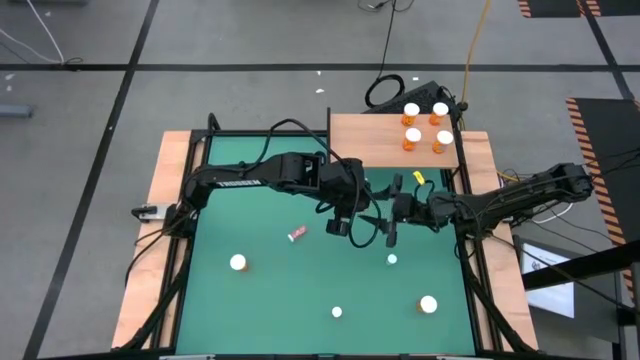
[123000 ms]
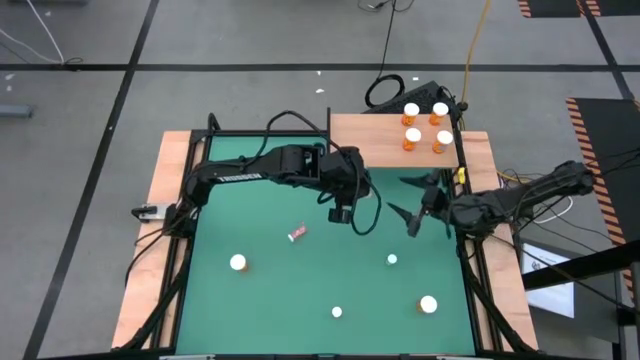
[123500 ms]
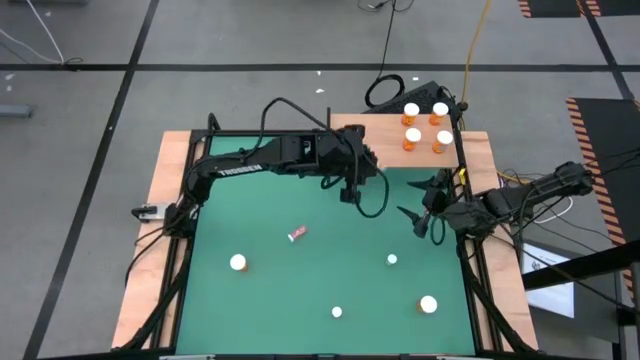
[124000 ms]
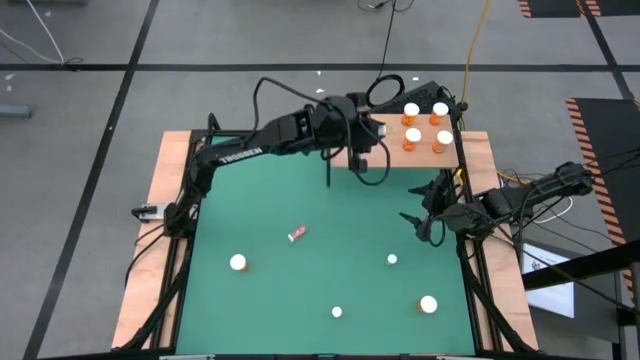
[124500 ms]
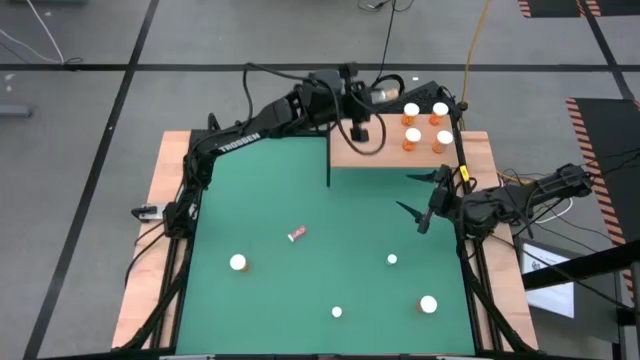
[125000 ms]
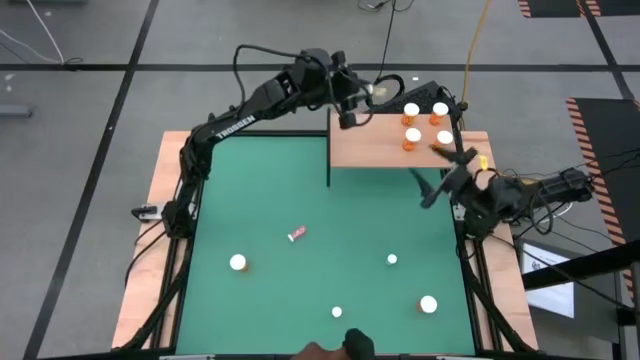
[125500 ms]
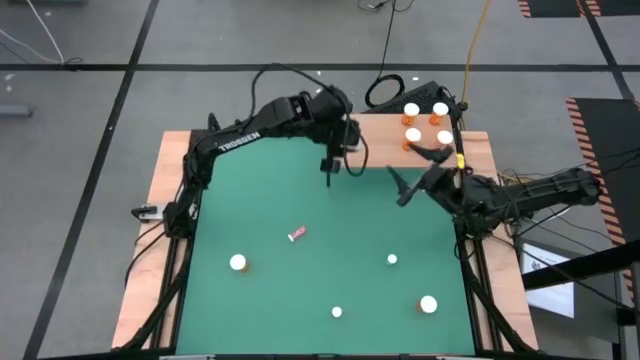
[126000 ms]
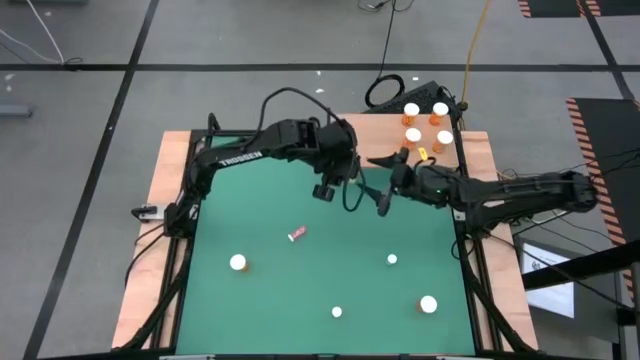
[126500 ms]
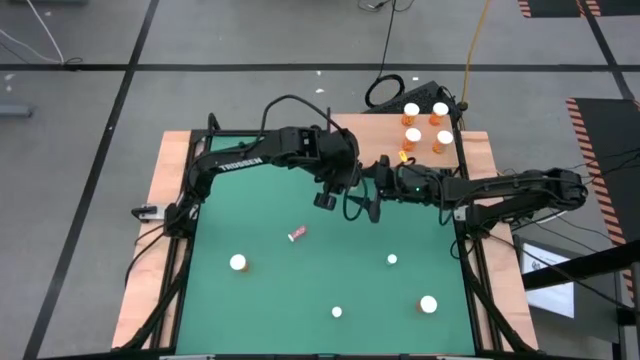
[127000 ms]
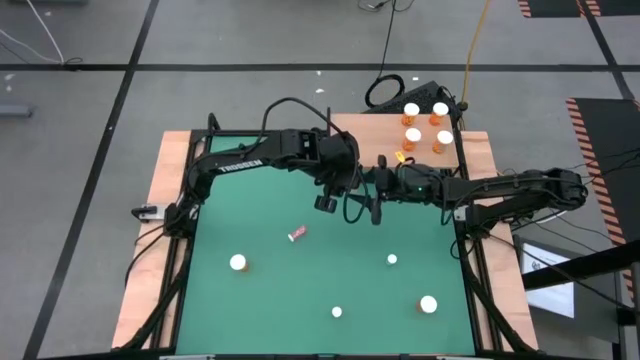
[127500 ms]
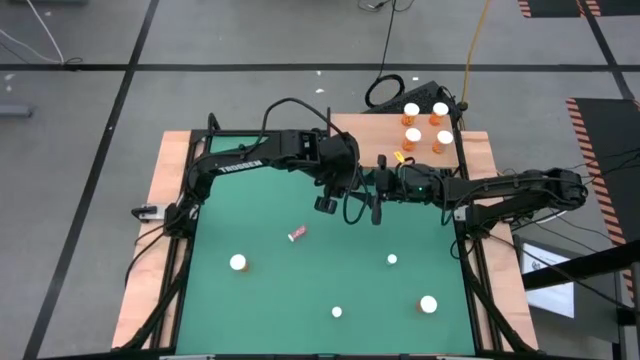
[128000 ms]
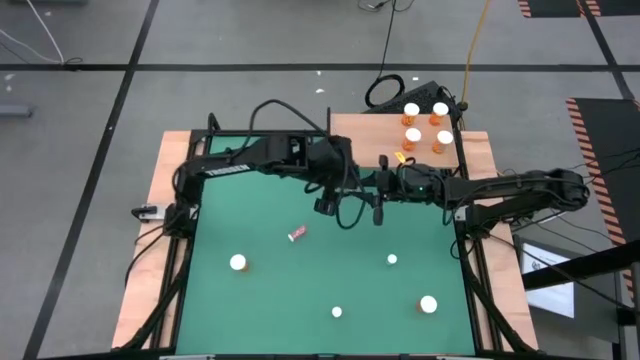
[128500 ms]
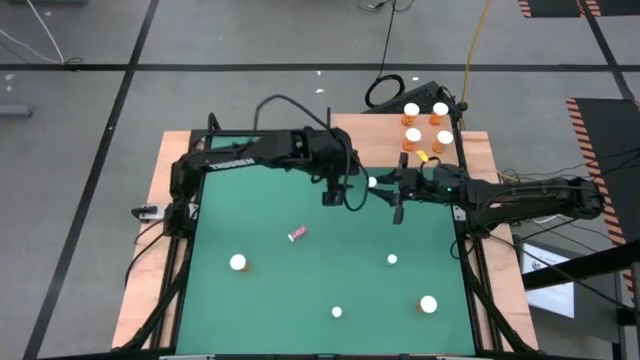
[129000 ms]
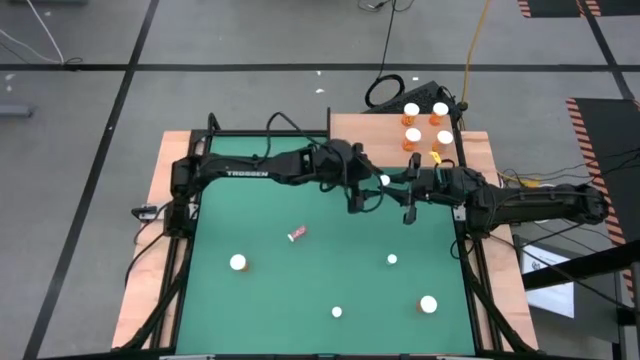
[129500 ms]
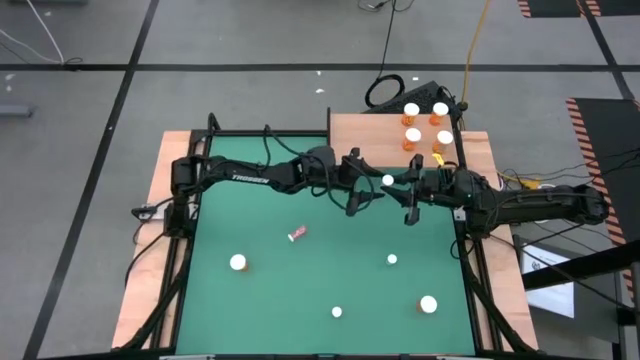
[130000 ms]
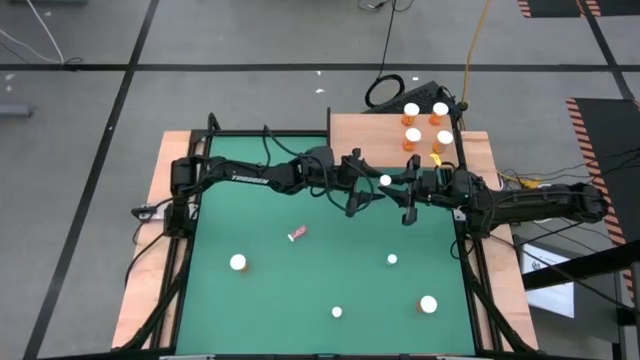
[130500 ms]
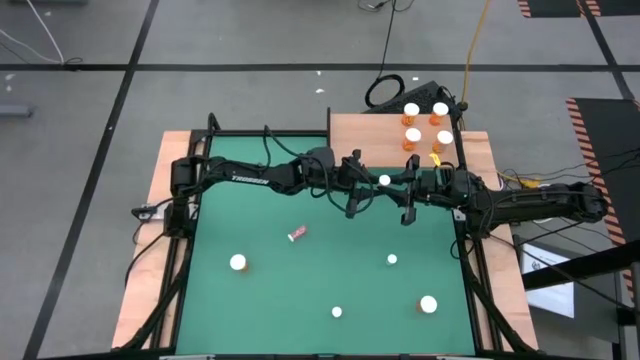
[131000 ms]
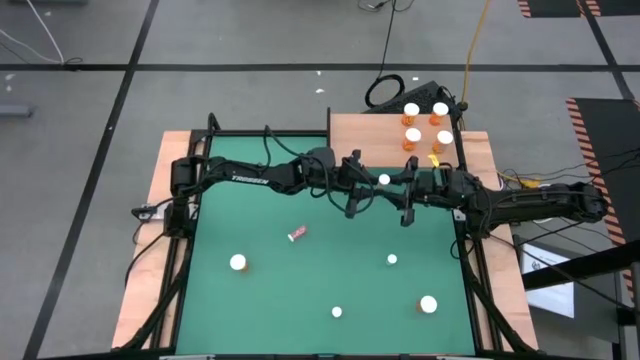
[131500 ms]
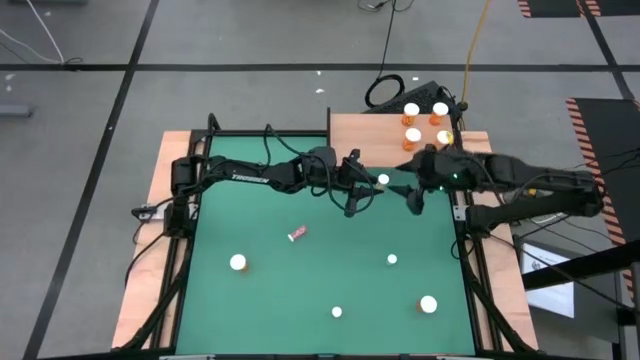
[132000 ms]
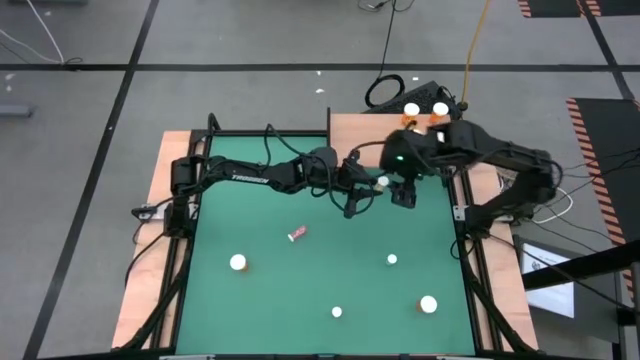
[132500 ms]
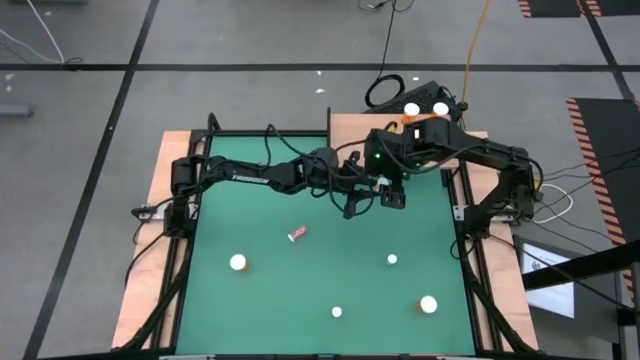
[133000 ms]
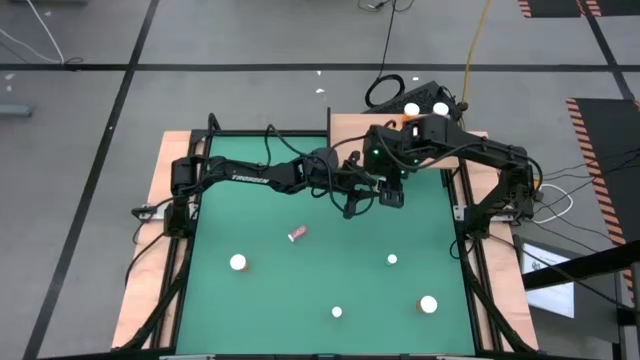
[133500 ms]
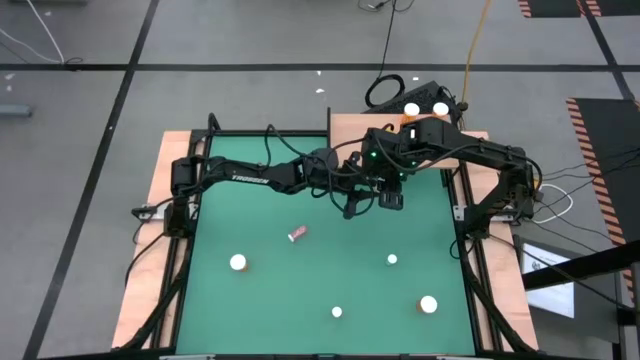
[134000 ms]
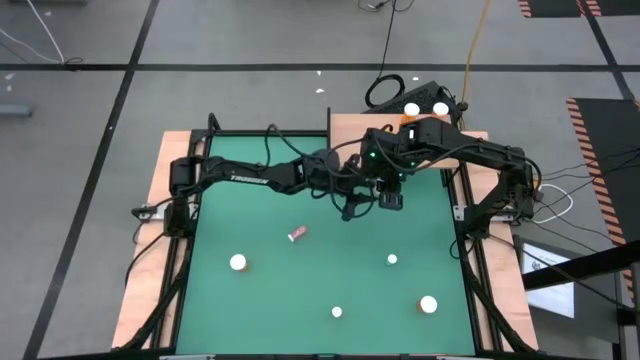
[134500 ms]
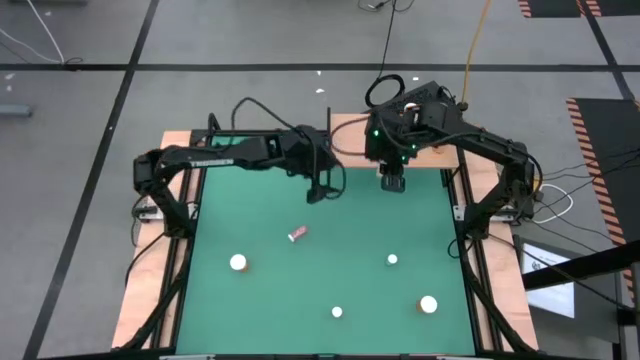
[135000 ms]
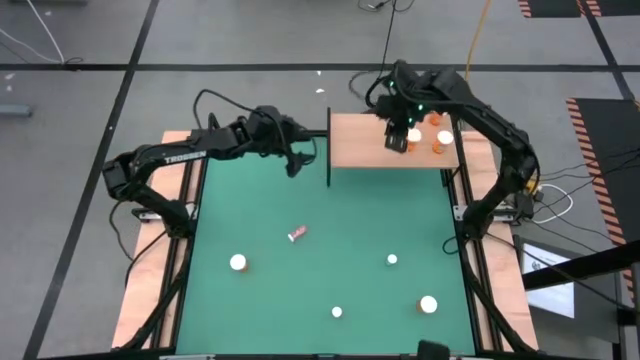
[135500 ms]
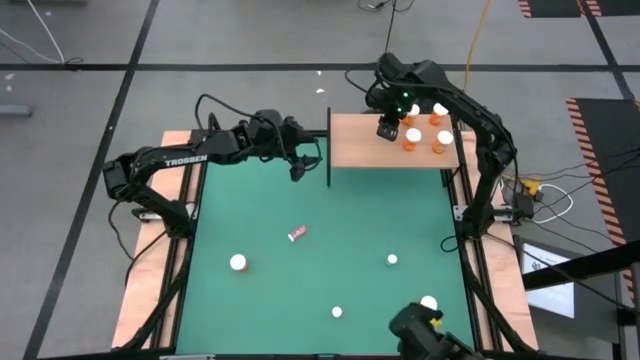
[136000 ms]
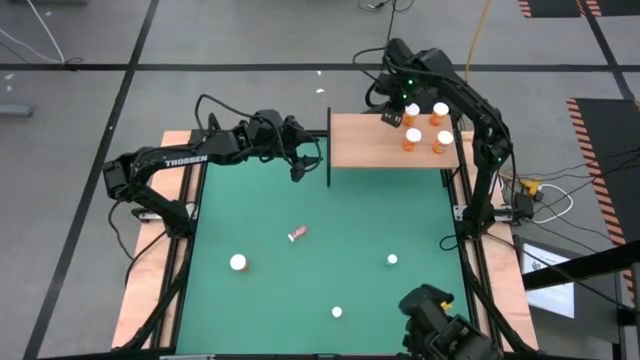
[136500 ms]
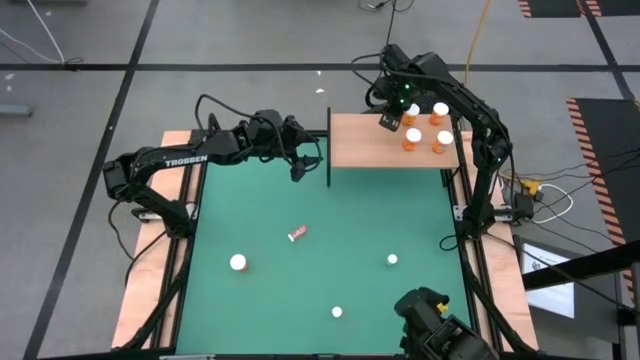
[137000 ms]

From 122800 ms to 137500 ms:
Task: Pick and place medicine bottles onto shelf by color
Put the yellow pill bottle on the shelf

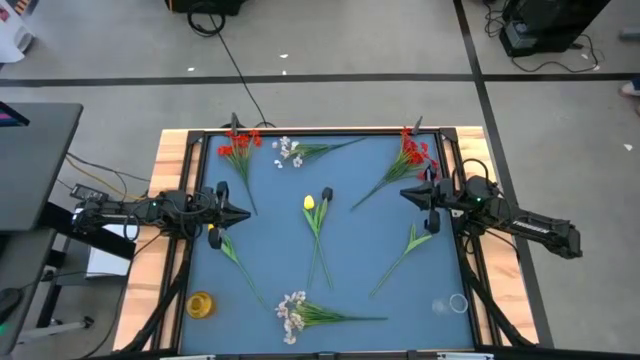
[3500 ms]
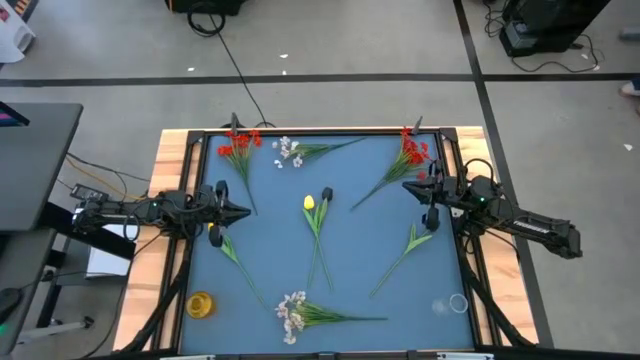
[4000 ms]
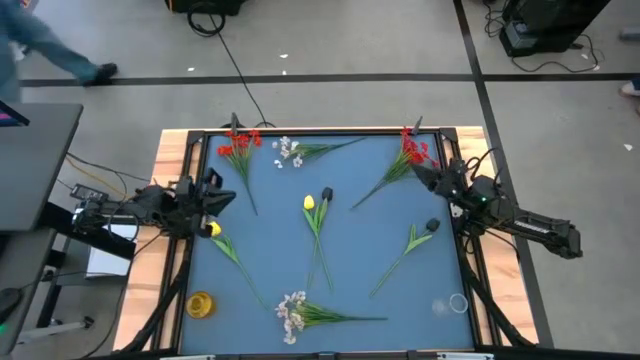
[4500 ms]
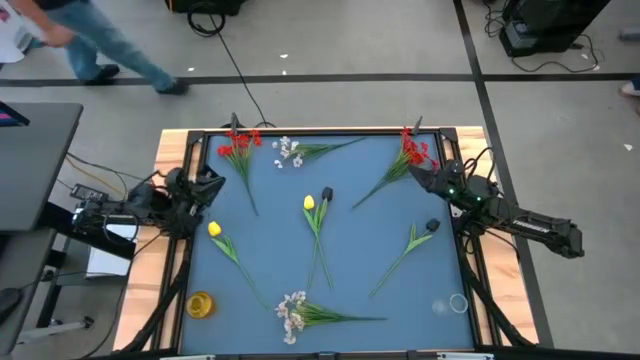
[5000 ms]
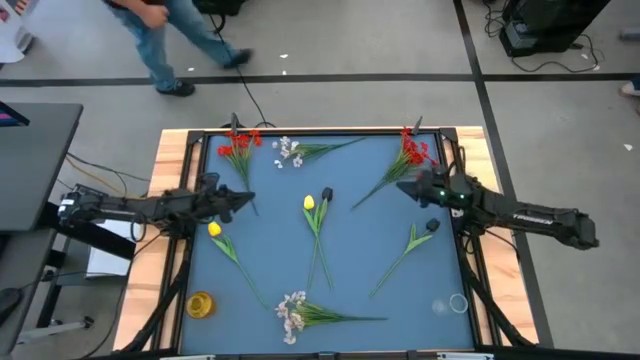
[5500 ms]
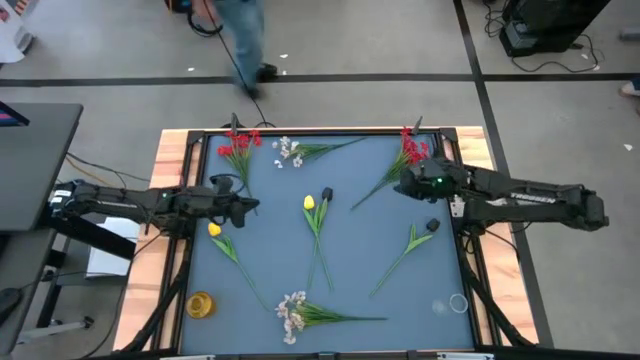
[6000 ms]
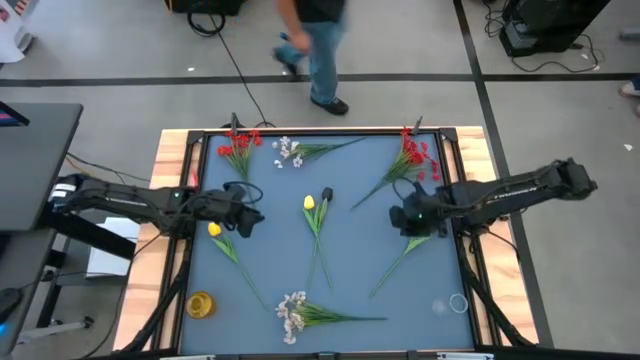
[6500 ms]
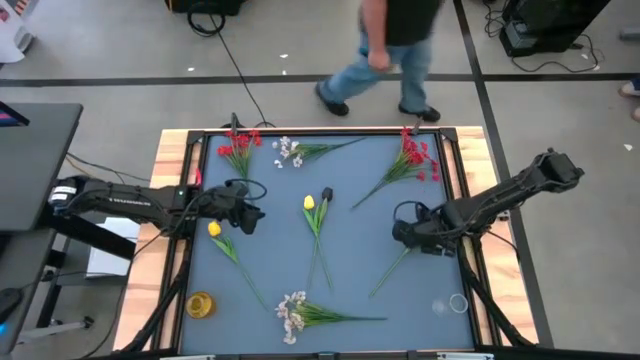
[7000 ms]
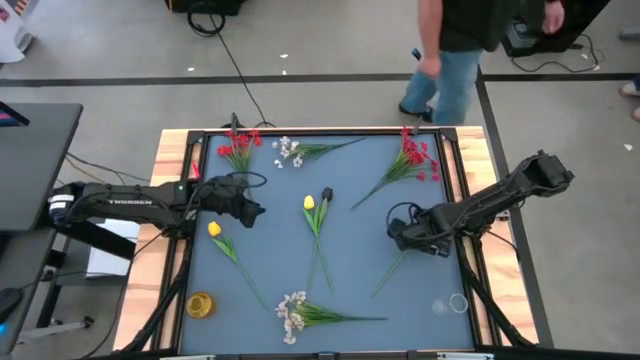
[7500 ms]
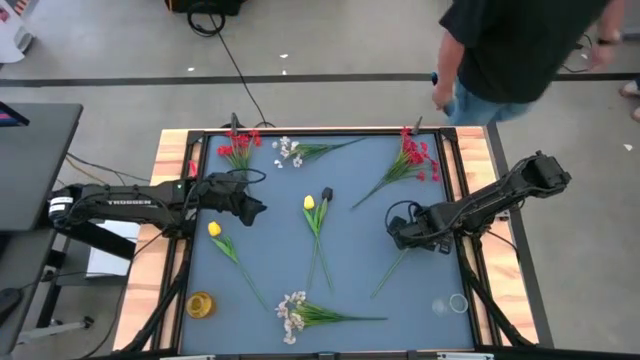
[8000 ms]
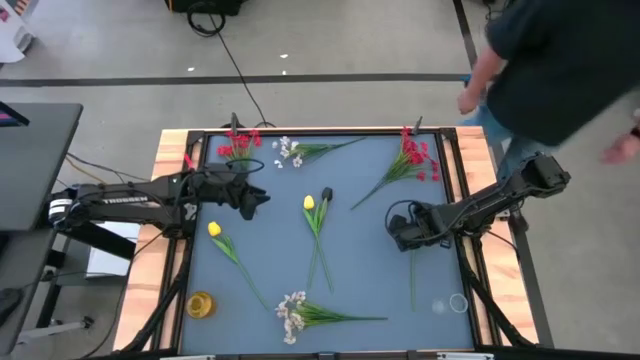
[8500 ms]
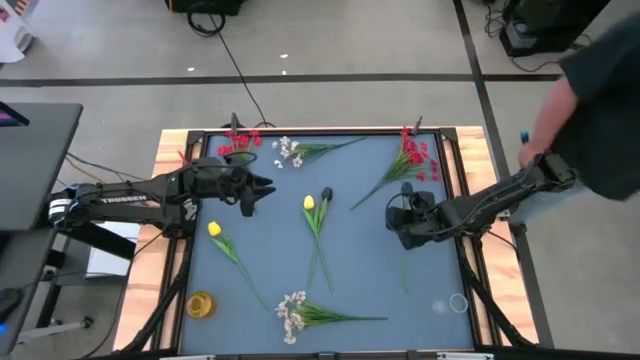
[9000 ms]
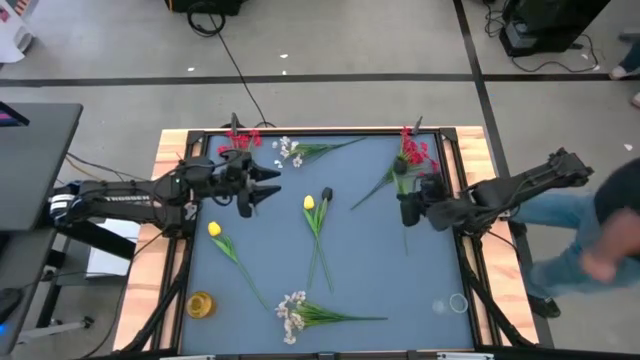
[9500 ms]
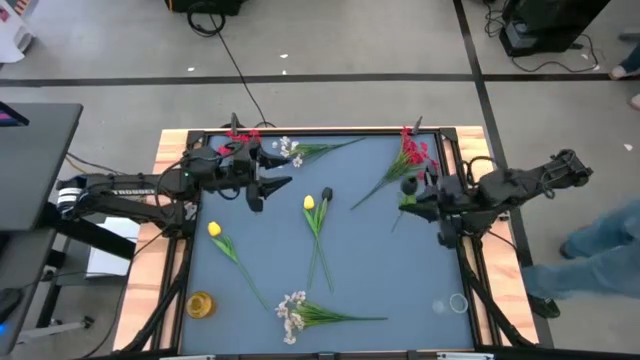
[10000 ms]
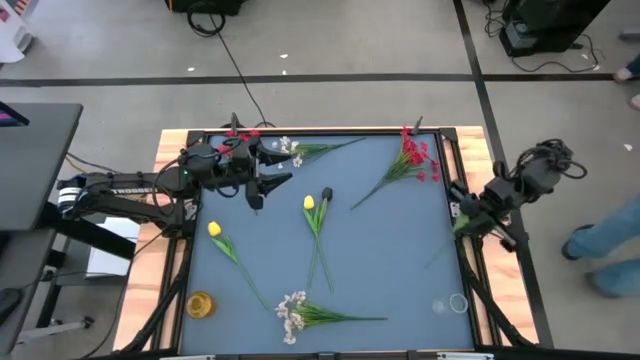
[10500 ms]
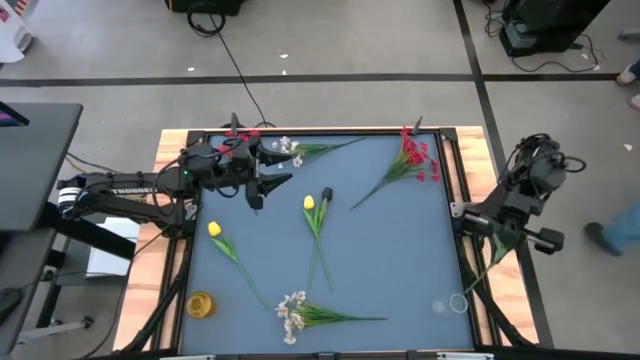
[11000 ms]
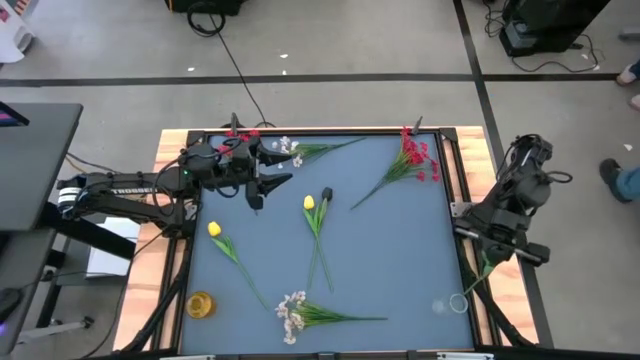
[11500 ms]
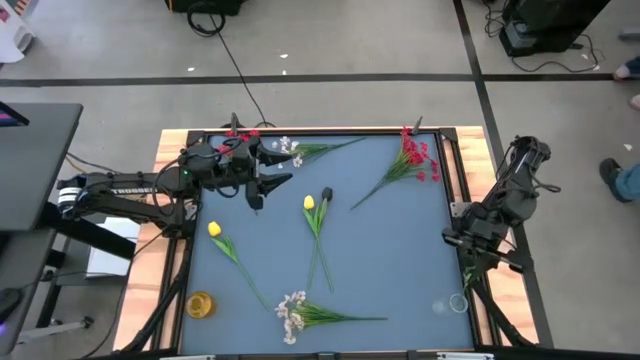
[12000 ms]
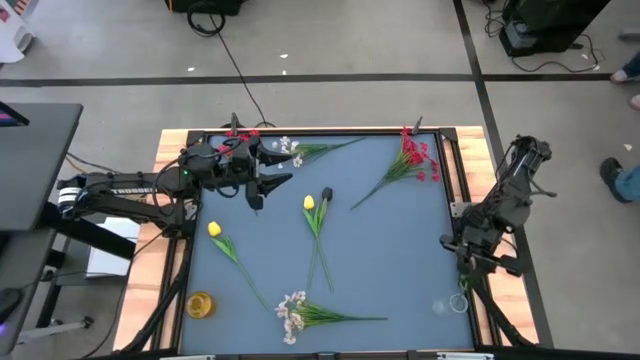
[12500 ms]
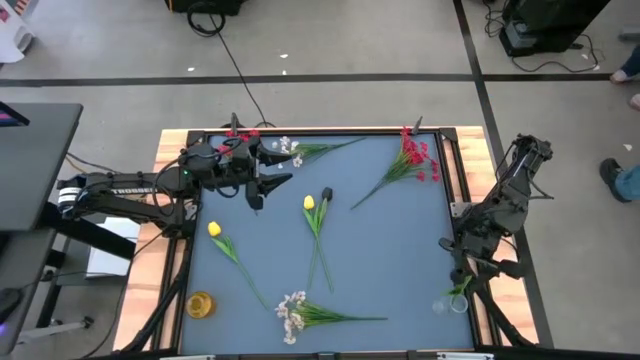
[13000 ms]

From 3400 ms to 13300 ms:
Task: Sort flowers into vase by color
Put the right black flower into the transparent vase
